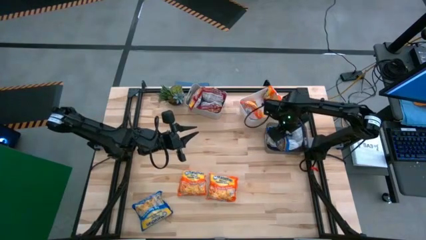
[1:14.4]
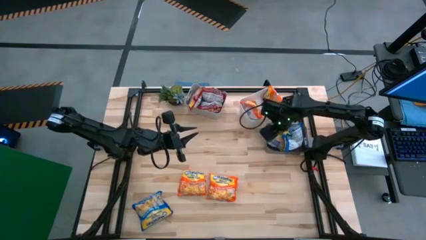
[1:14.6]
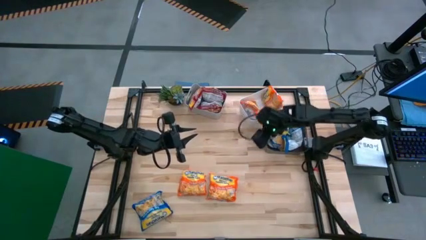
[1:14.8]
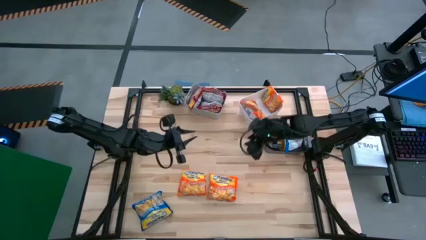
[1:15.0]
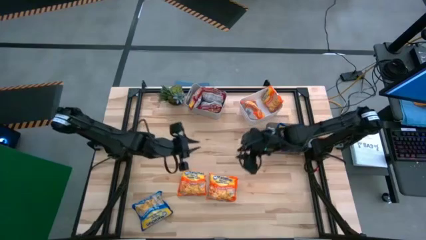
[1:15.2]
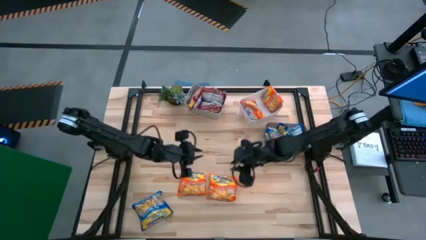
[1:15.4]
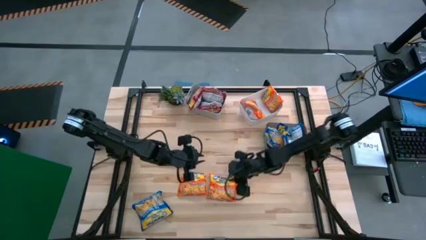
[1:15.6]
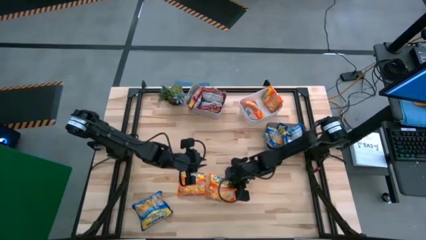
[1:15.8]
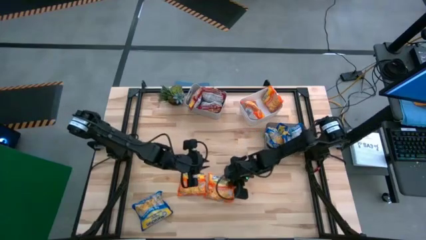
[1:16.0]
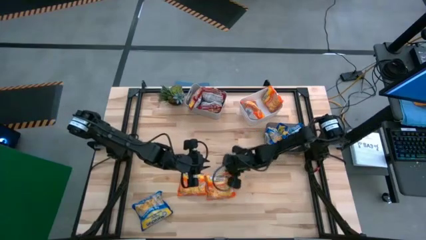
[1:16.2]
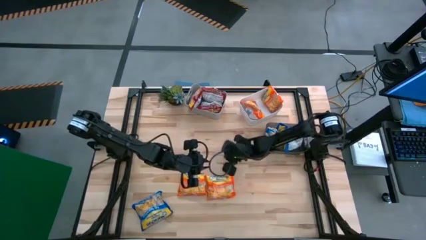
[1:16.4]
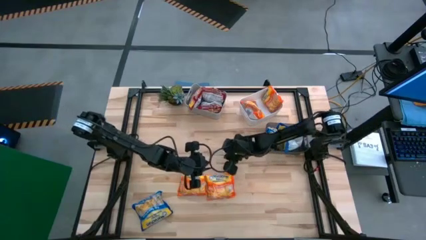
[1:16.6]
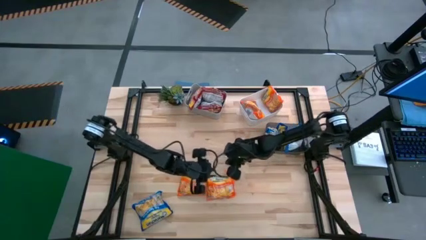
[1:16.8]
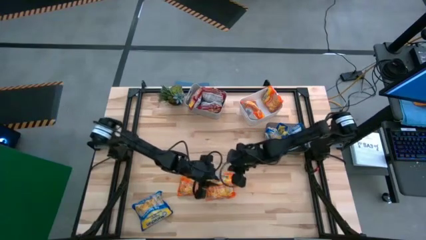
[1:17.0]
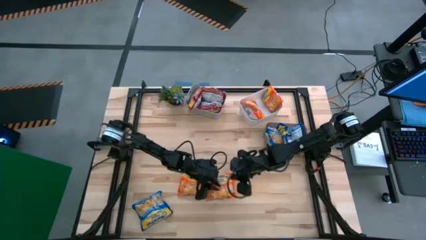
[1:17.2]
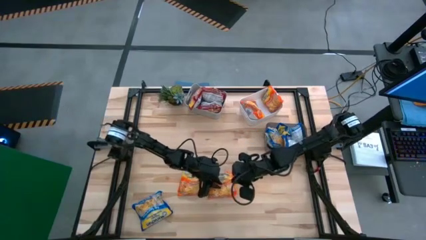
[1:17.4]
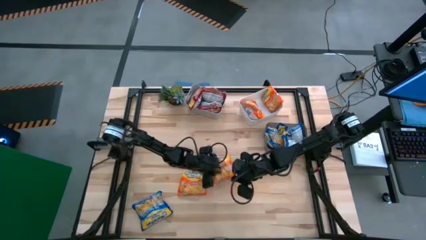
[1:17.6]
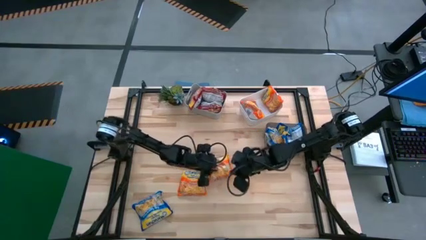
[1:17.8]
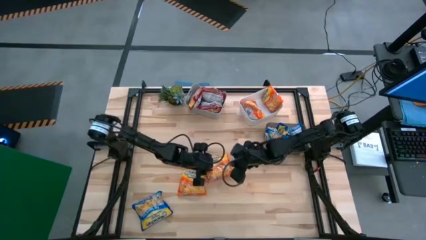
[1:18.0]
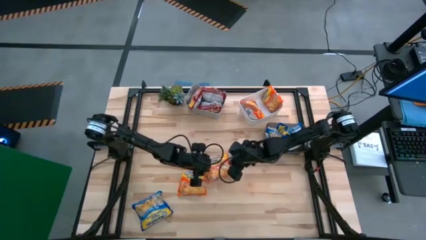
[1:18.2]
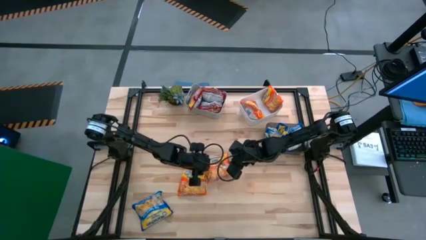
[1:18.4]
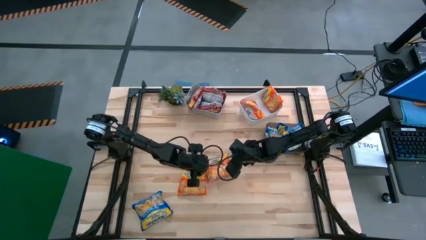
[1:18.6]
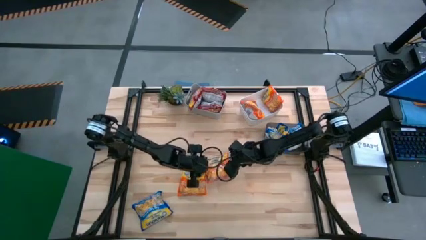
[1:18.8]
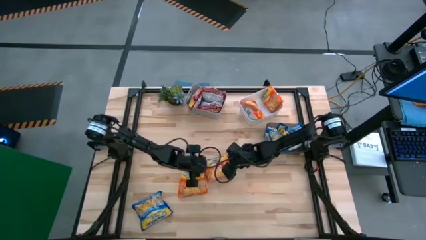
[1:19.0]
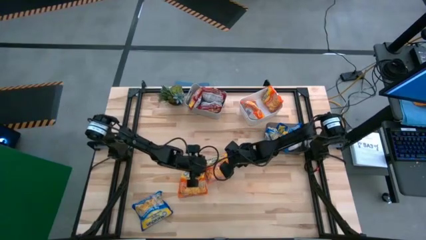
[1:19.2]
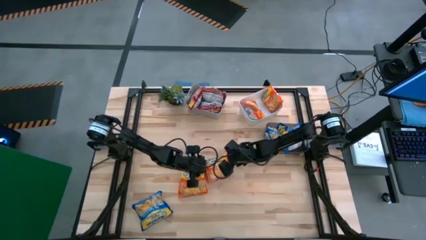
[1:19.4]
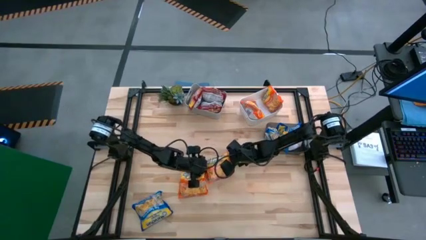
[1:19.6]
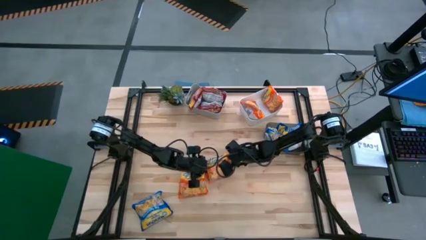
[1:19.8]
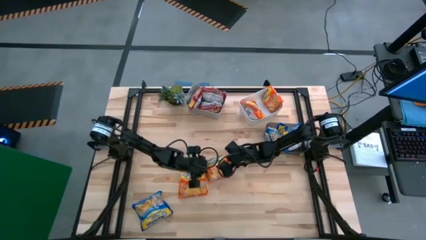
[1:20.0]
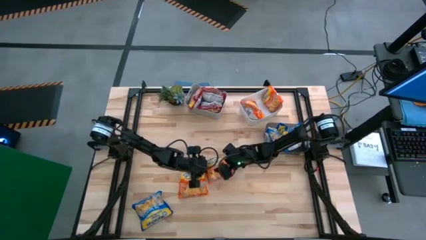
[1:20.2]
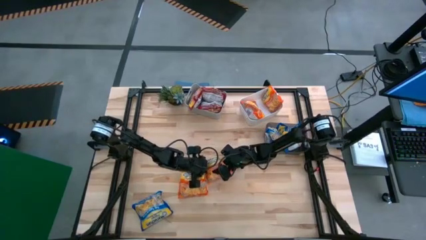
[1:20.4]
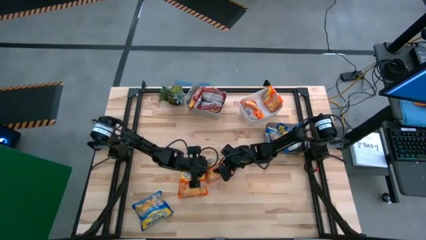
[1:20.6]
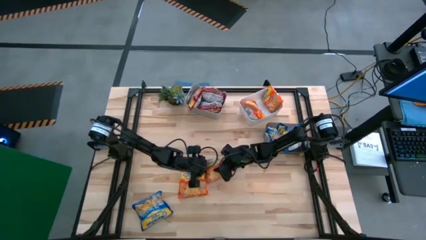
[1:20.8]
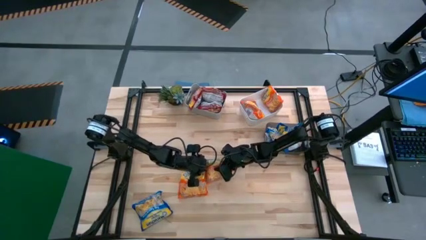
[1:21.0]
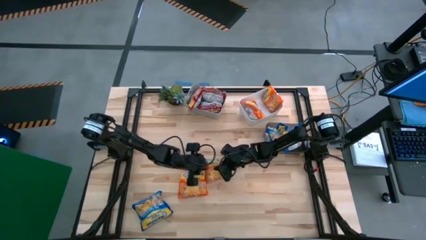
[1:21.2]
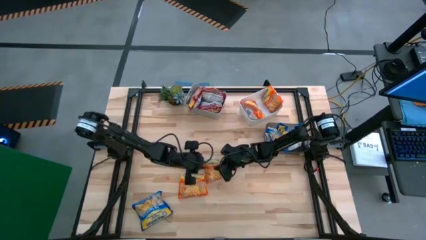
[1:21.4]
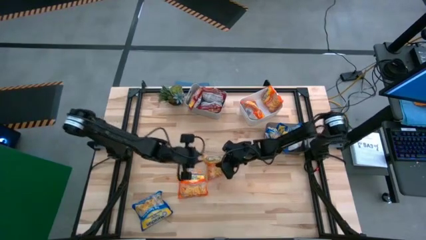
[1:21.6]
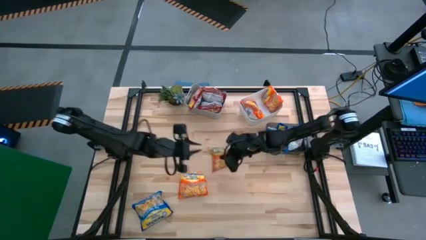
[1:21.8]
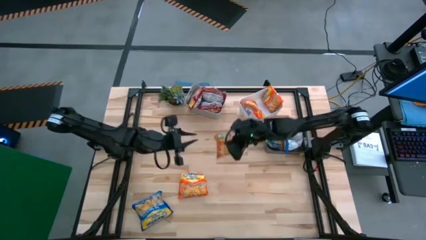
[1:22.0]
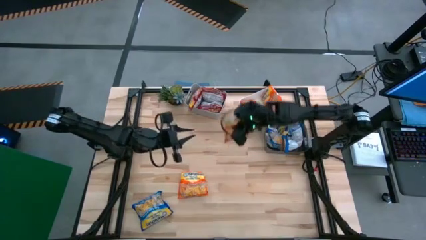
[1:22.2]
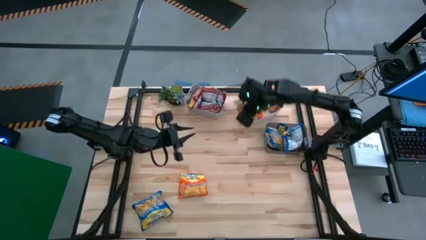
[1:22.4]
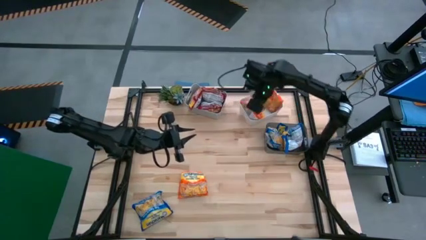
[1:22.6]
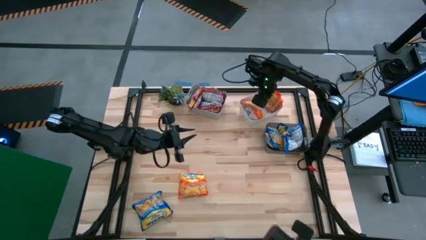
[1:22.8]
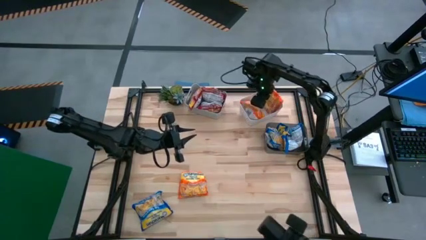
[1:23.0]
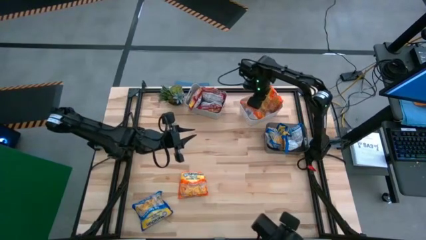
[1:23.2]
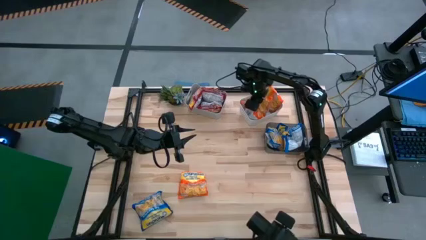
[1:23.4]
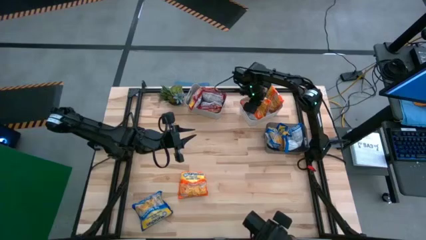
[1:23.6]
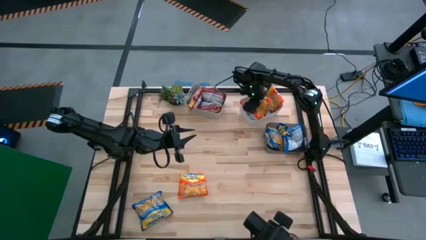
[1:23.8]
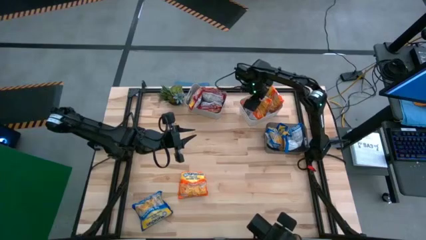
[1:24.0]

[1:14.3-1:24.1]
Task: Sort Maruchan noodles
Put the orange noodle pack into the white bin

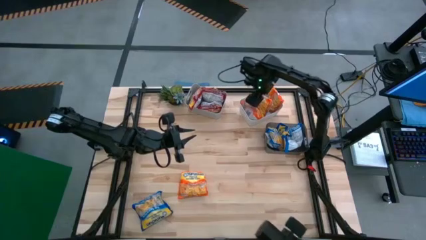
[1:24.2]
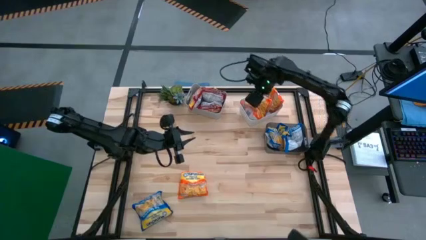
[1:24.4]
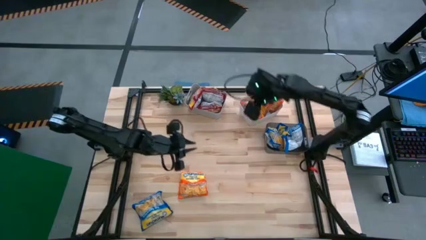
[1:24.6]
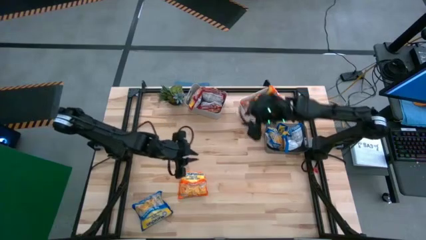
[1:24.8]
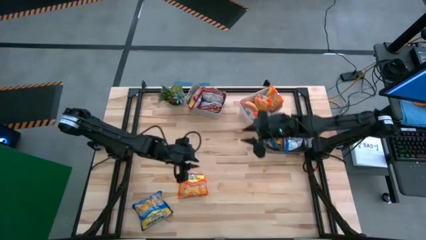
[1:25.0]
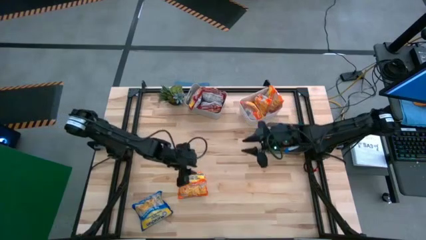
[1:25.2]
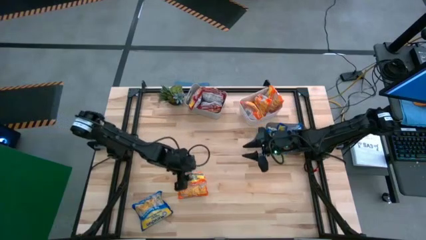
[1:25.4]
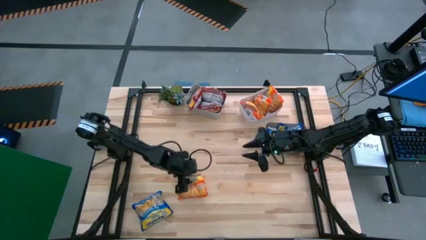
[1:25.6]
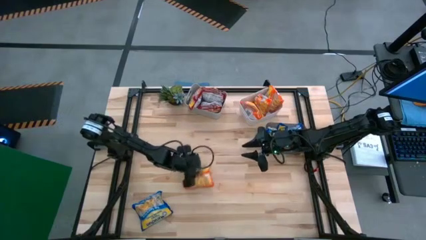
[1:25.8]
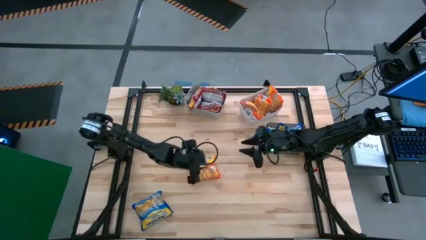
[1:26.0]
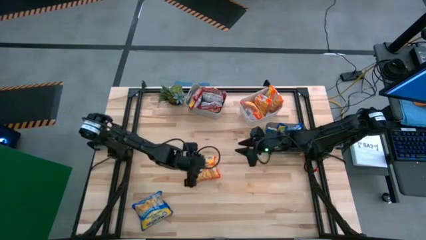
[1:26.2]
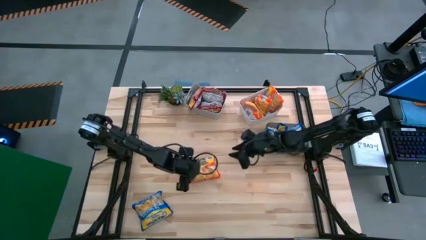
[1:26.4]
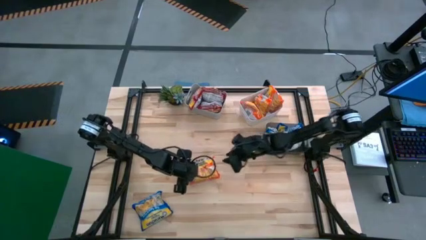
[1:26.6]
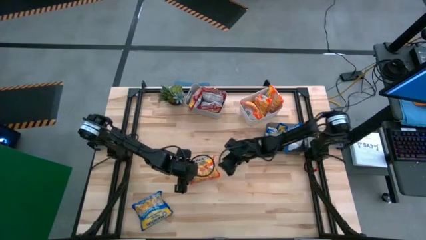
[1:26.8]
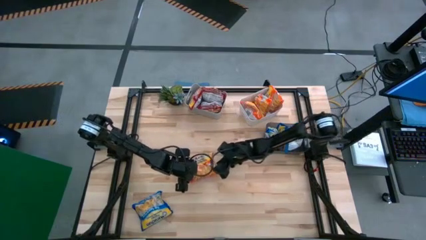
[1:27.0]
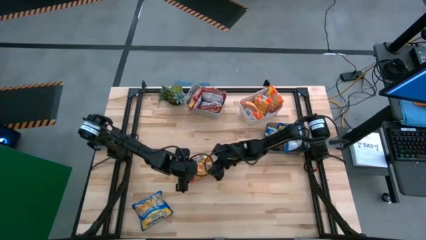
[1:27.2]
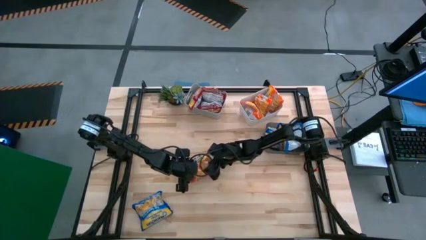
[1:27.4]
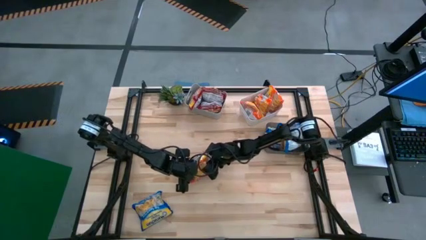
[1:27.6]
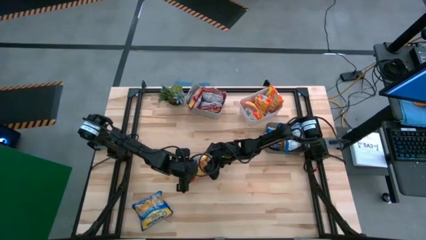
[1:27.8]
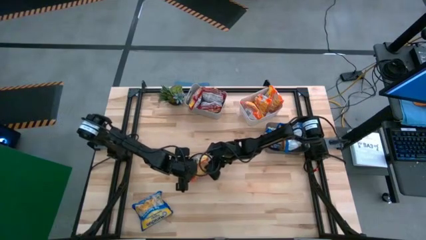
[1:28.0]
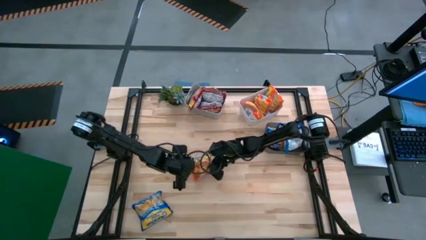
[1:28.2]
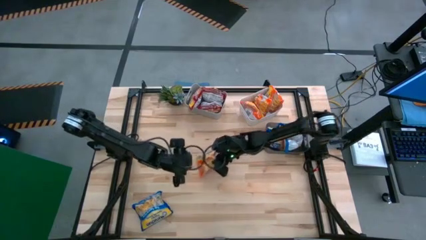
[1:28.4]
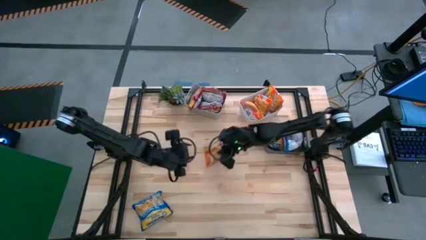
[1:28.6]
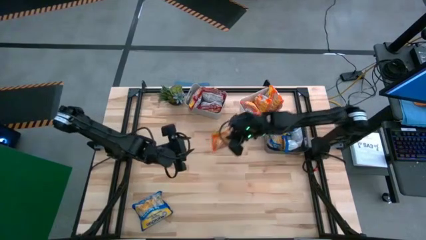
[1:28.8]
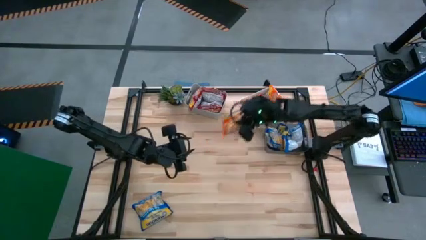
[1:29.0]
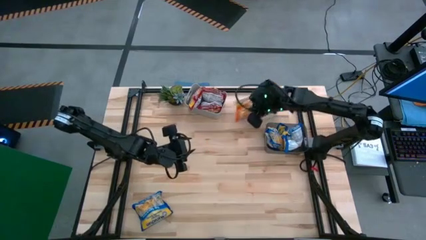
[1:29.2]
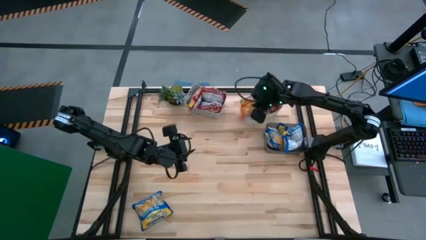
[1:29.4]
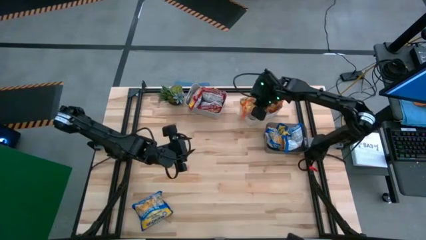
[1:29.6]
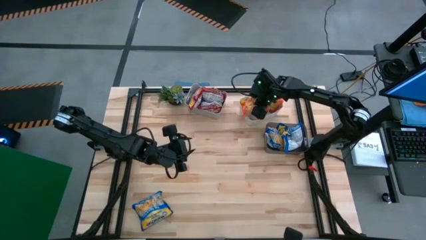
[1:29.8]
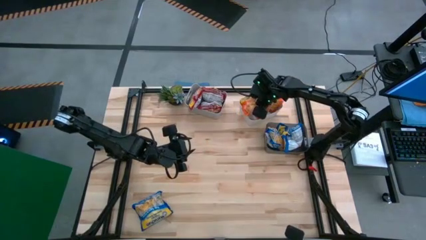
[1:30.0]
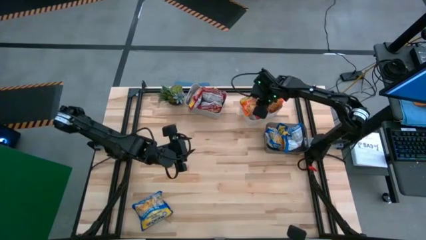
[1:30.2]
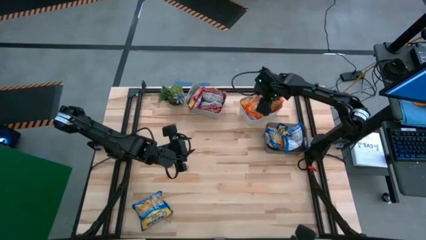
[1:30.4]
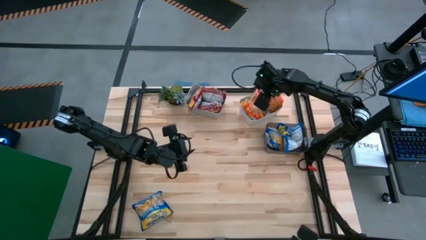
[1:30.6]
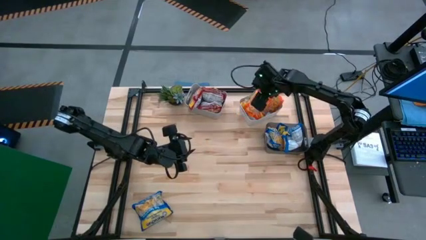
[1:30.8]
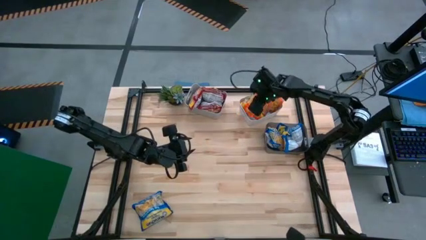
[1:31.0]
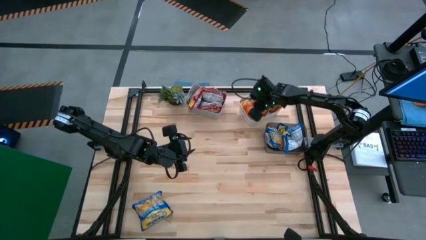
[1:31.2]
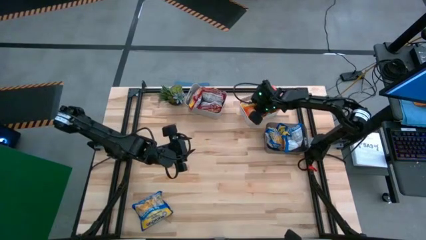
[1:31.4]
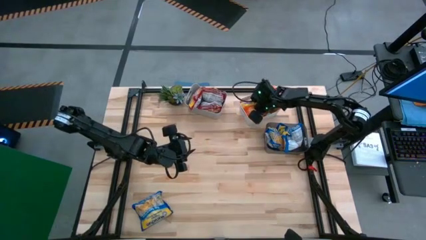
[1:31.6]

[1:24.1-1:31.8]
Put the orange noodle pack into the white bin
